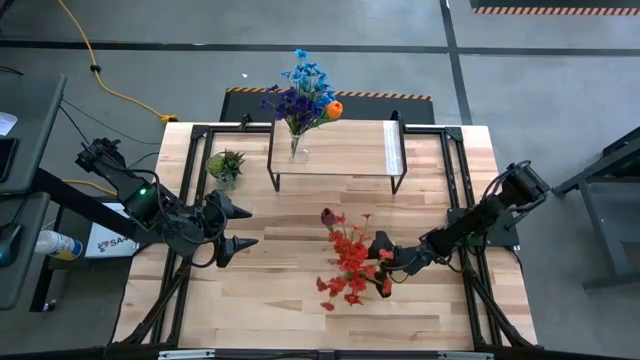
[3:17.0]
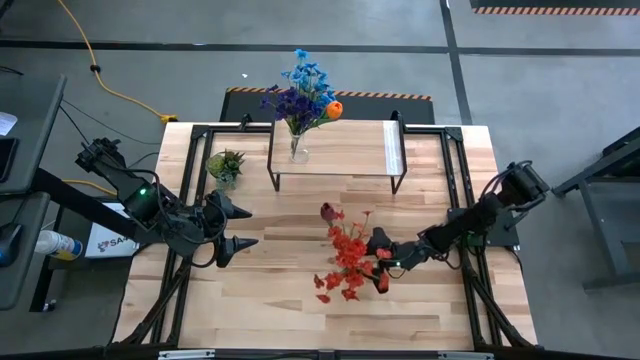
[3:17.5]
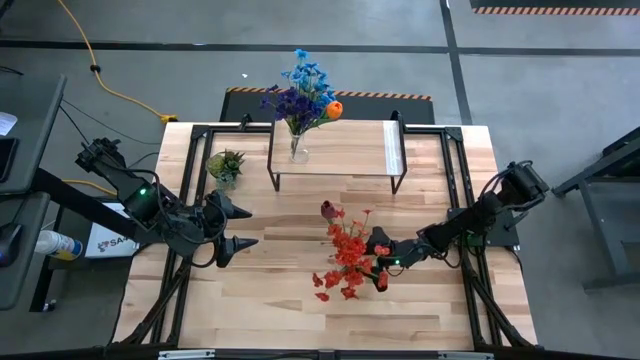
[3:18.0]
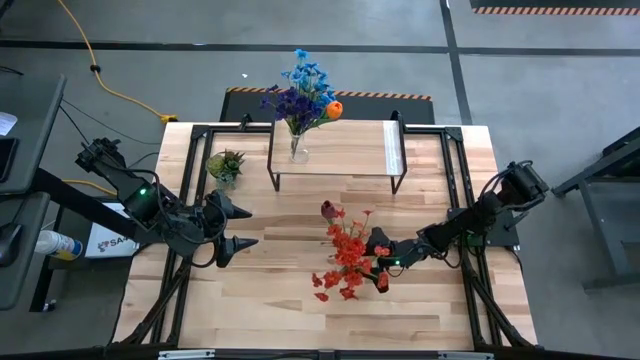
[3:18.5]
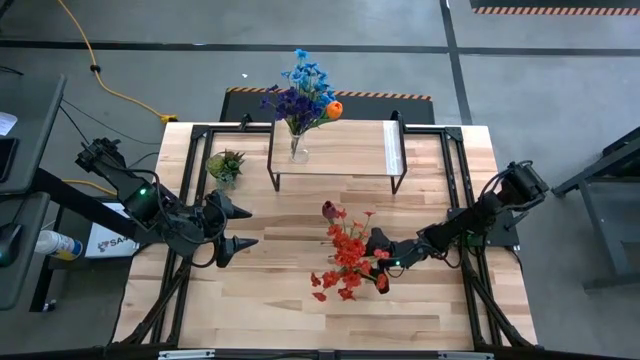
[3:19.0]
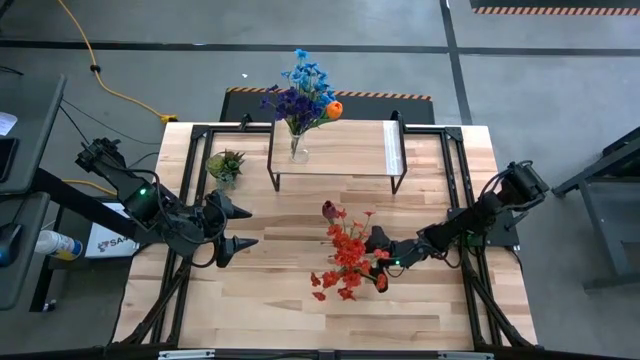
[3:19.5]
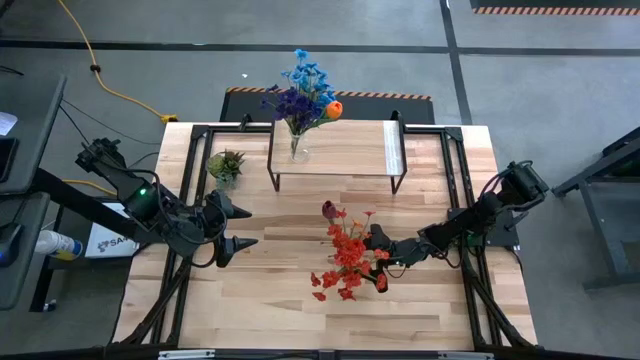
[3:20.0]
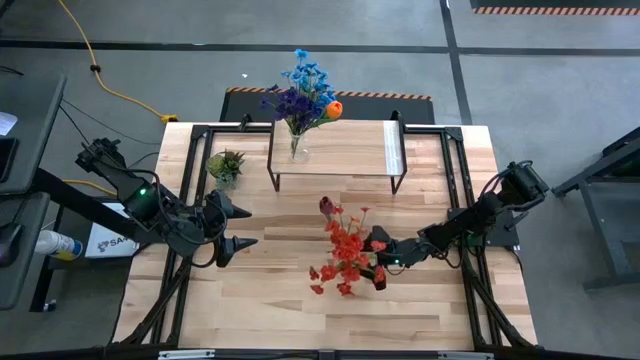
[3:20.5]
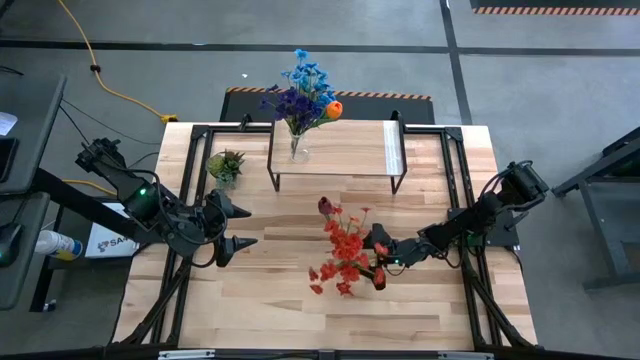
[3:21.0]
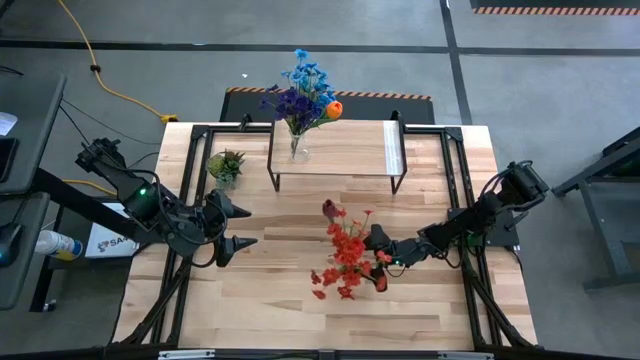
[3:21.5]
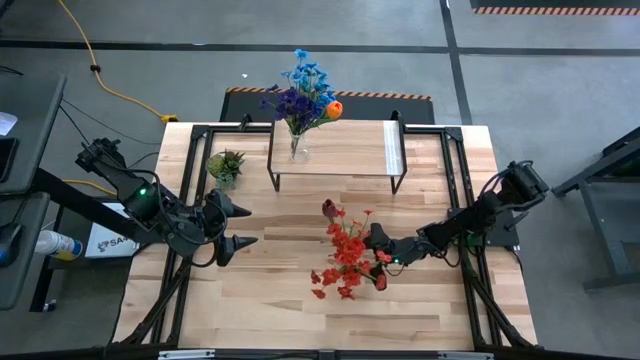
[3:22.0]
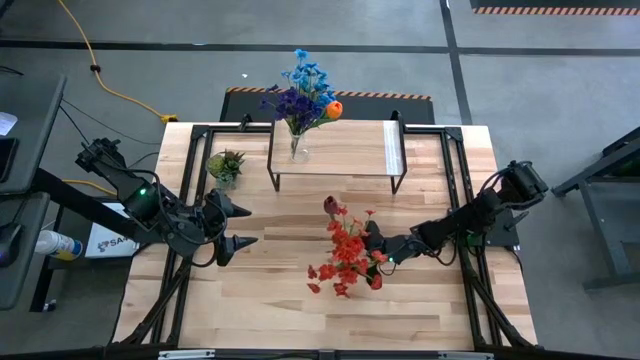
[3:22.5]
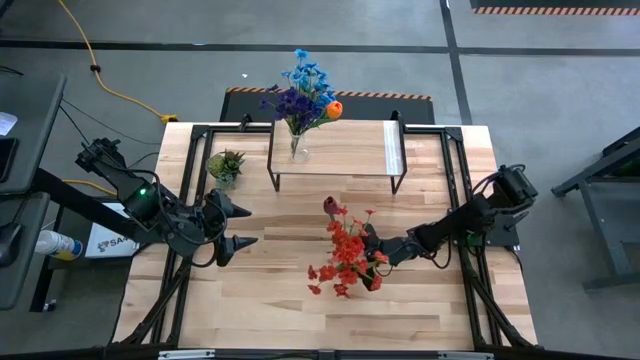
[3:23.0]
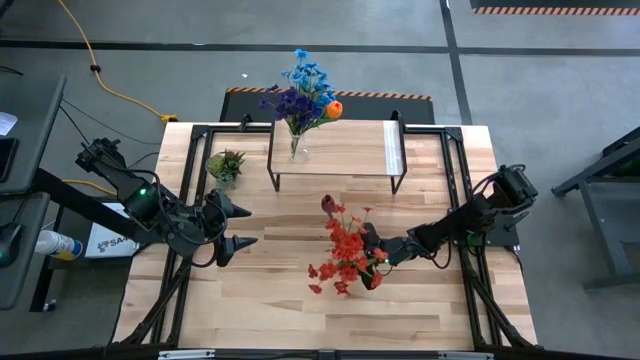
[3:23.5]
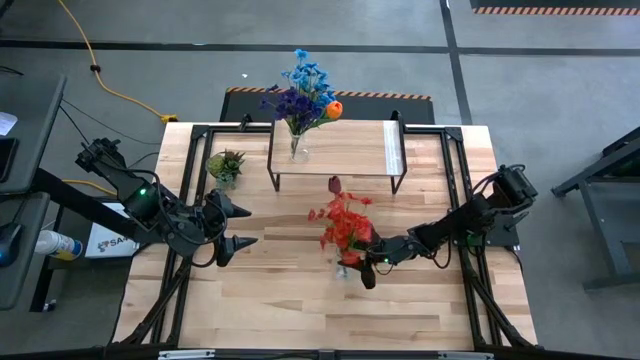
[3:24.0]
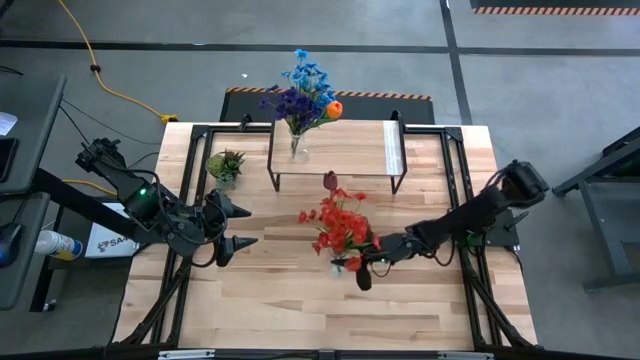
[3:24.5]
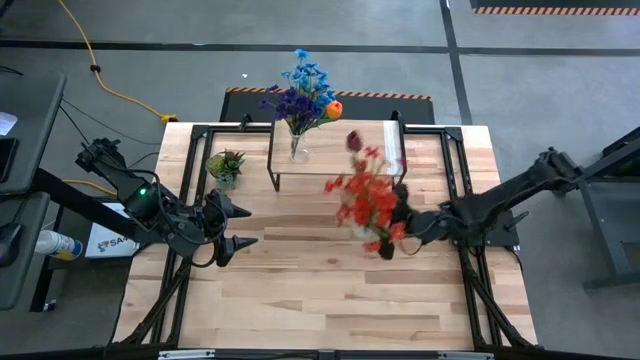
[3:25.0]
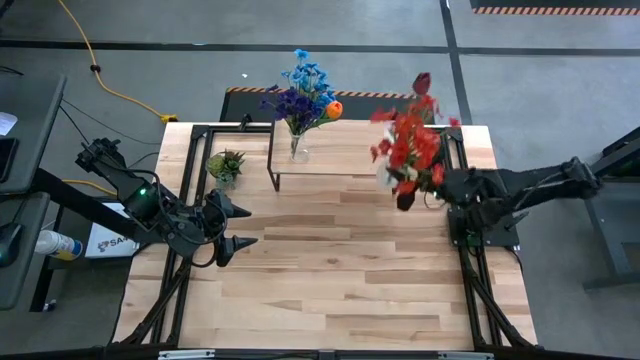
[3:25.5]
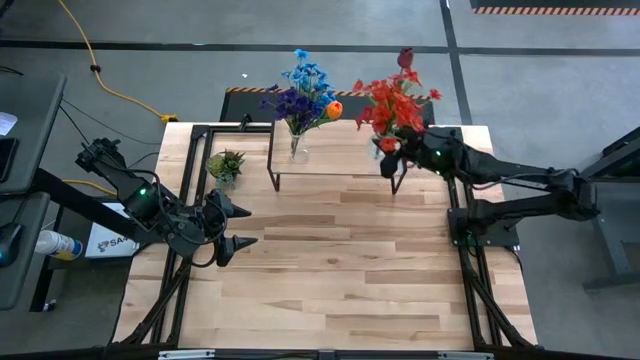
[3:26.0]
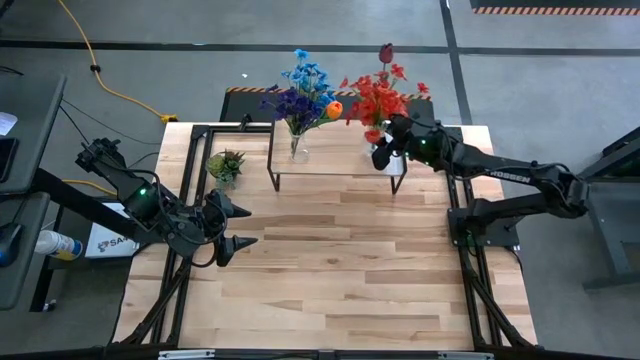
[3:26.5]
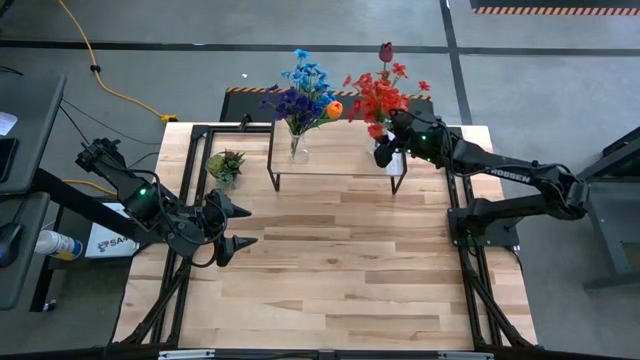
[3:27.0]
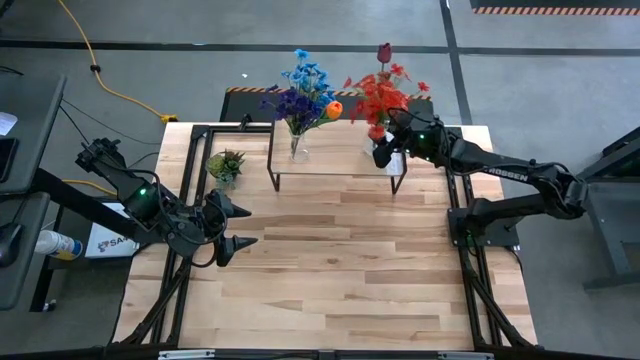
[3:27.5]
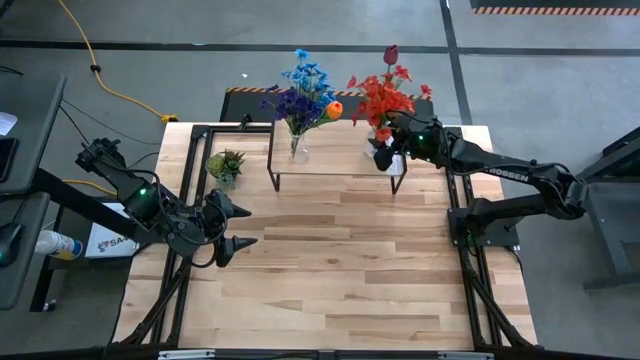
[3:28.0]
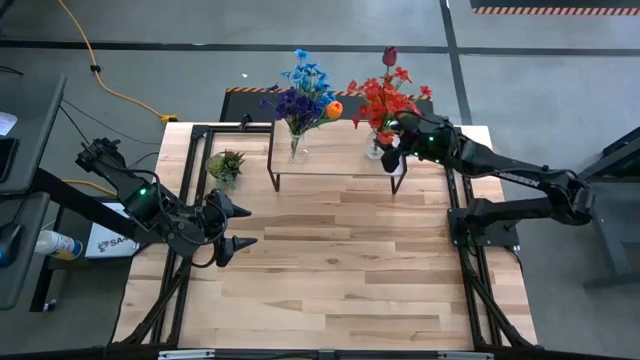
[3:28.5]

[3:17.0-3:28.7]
Task: Pick and place flowers into a vace then onto a shelf
Put the transparent flower vase with the flowers on the shelf

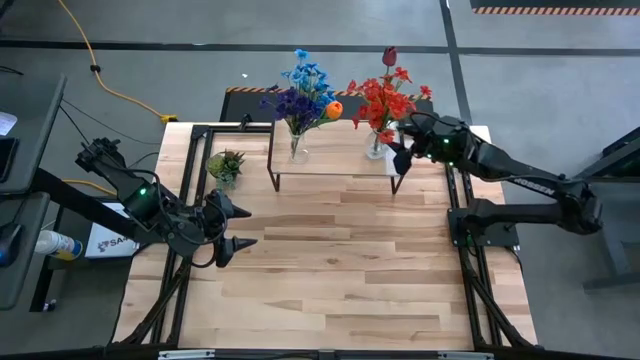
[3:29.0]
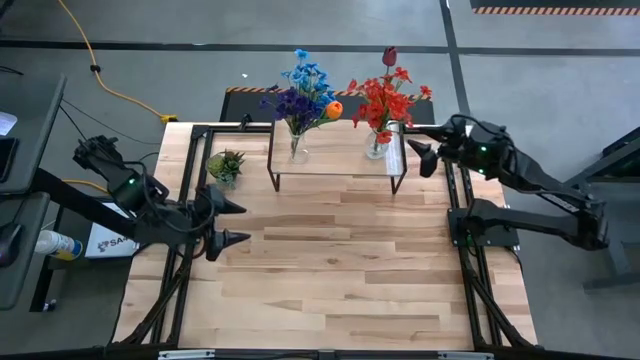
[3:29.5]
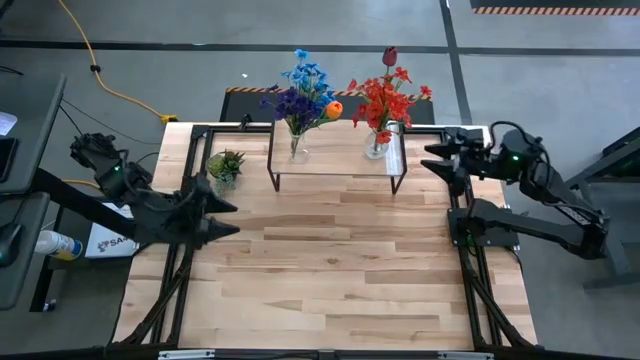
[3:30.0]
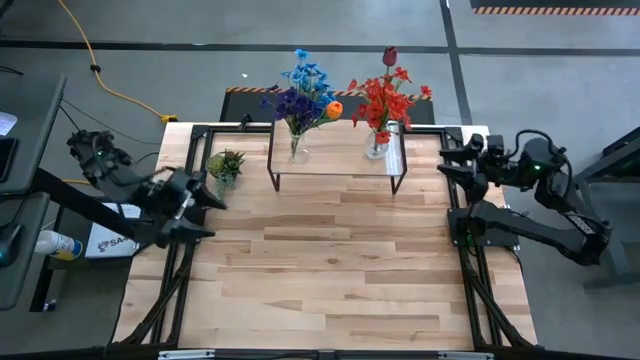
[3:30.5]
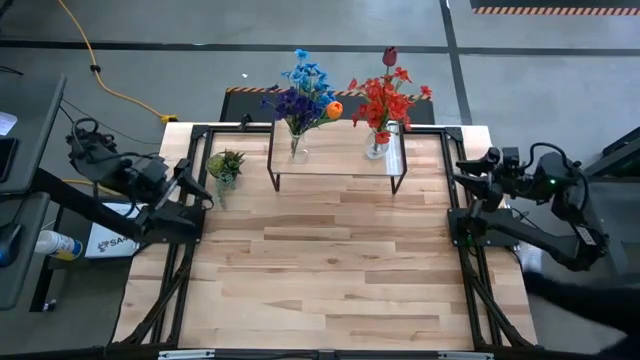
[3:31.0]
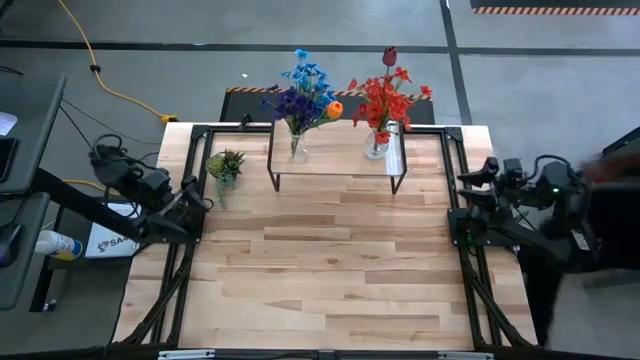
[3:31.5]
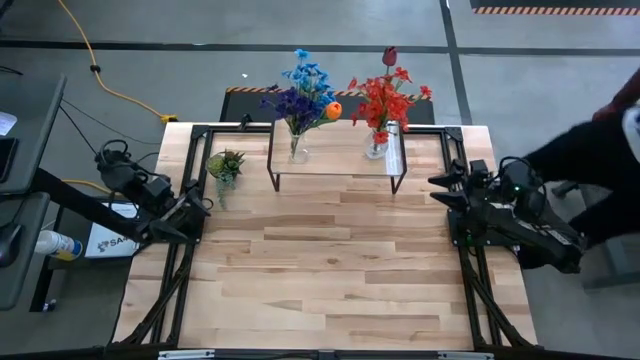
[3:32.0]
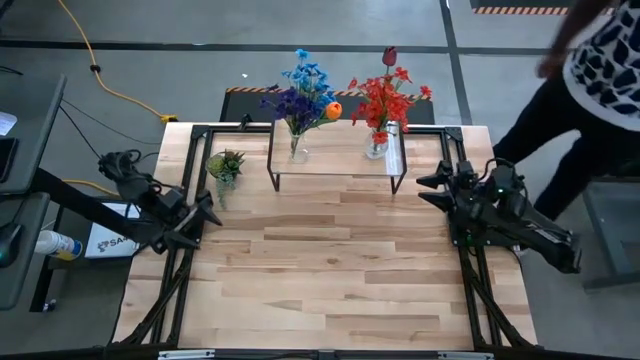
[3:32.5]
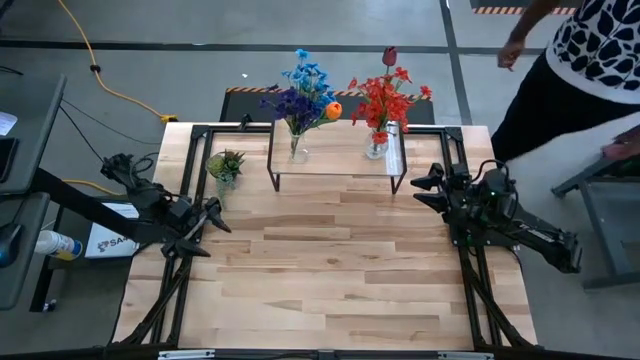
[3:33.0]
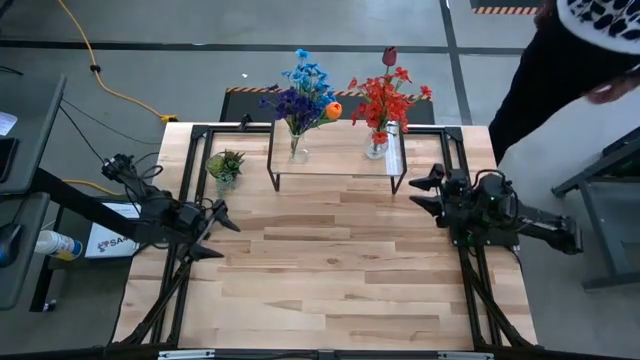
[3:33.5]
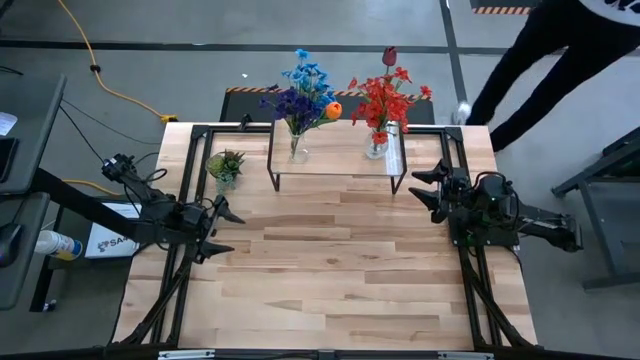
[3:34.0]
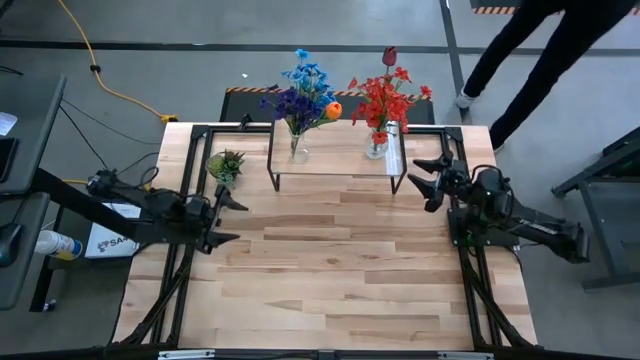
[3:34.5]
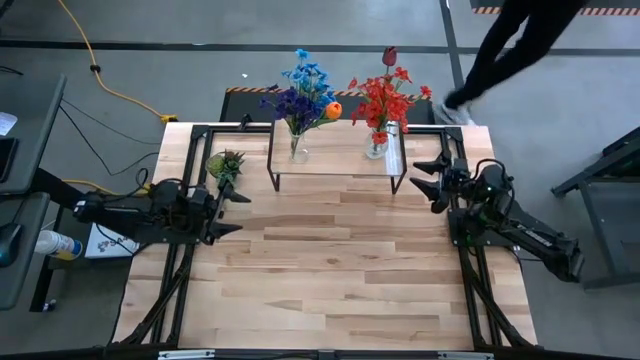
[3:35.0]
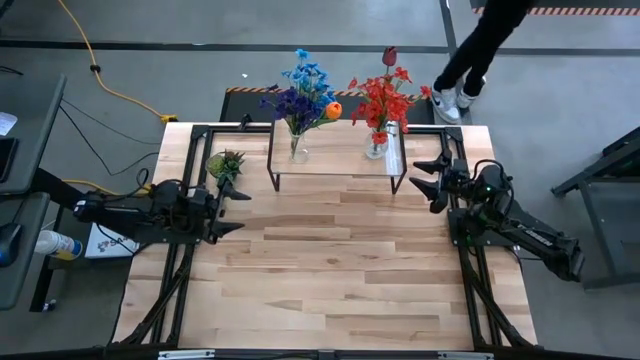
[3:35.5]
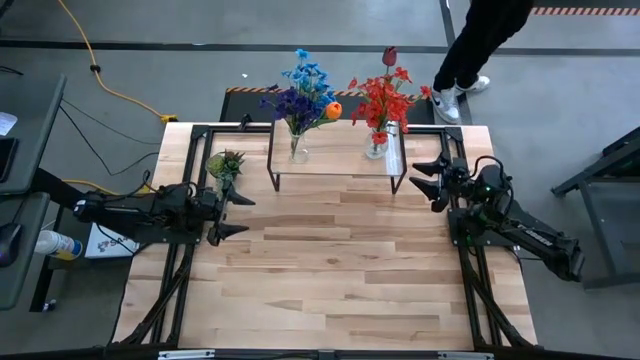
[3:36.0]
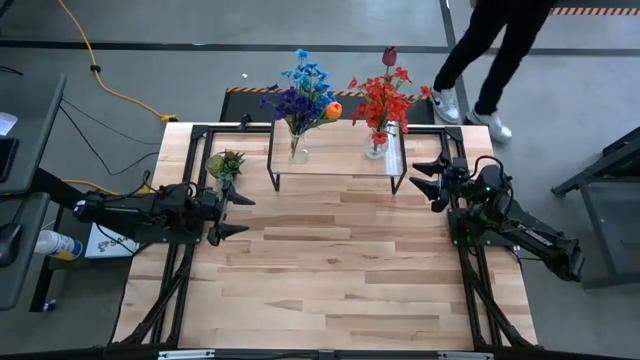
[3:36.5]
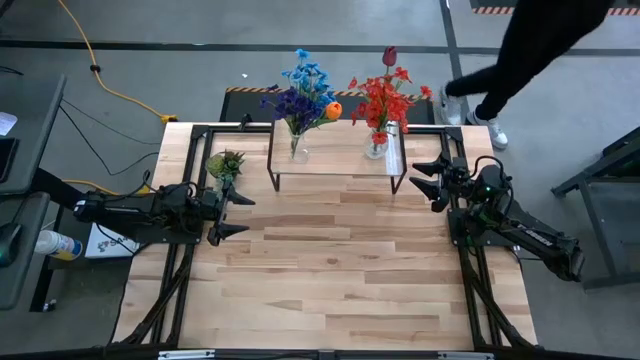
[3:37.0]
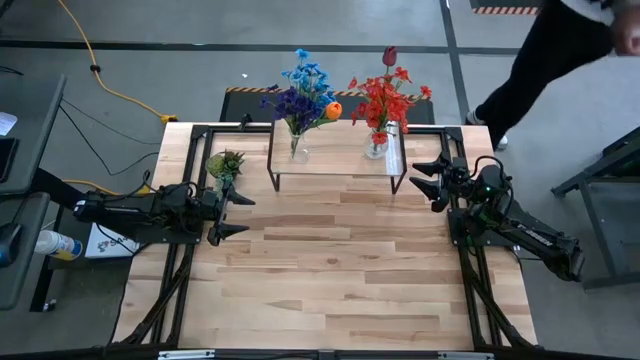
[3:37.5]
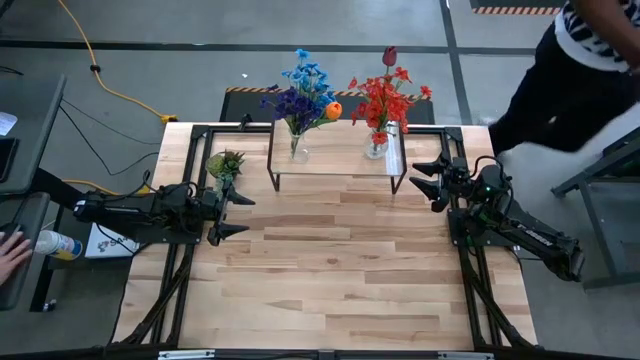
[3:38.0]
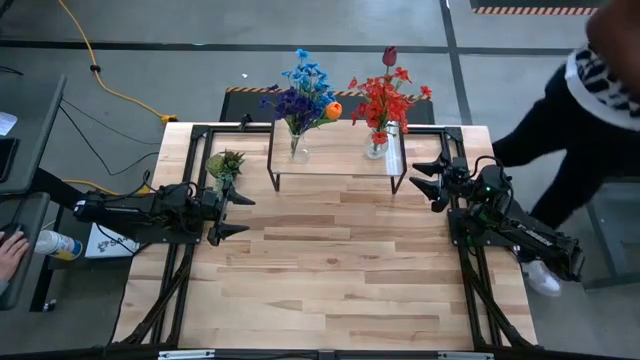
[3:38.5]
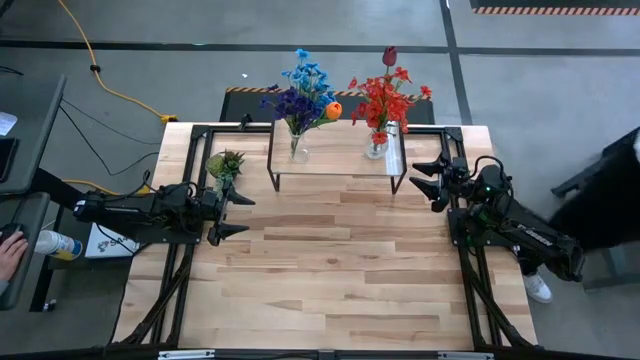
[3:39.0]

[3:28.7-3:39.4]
Return to Home Position
